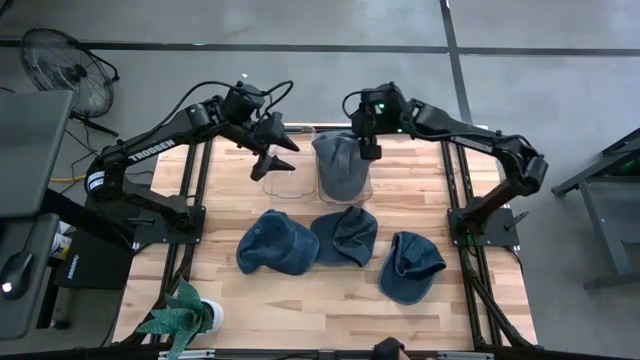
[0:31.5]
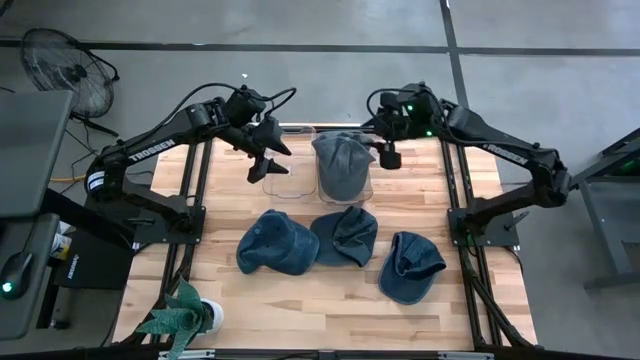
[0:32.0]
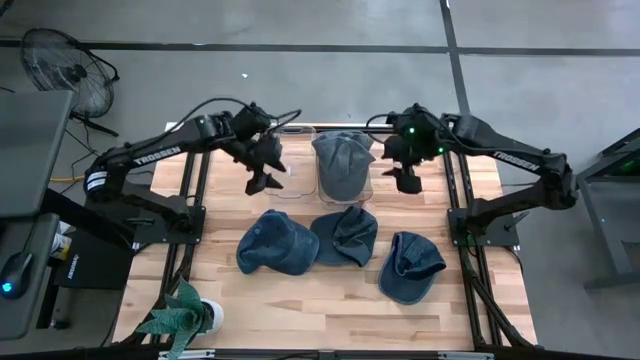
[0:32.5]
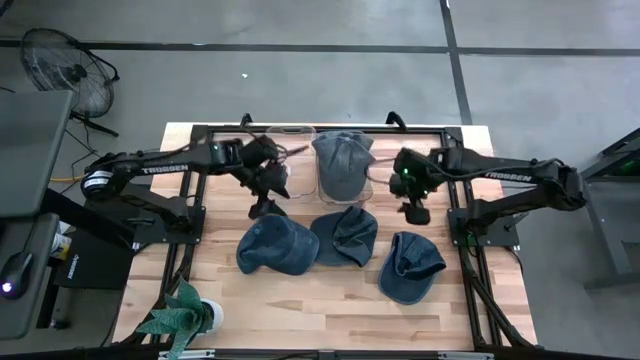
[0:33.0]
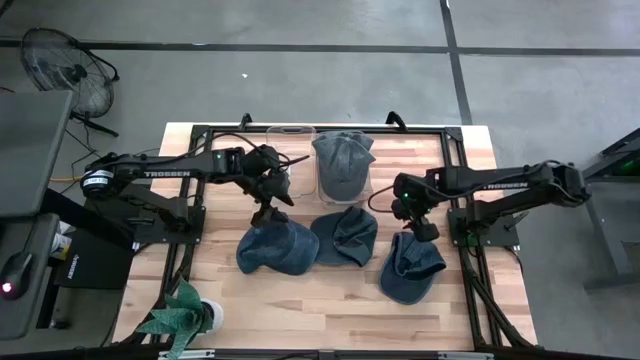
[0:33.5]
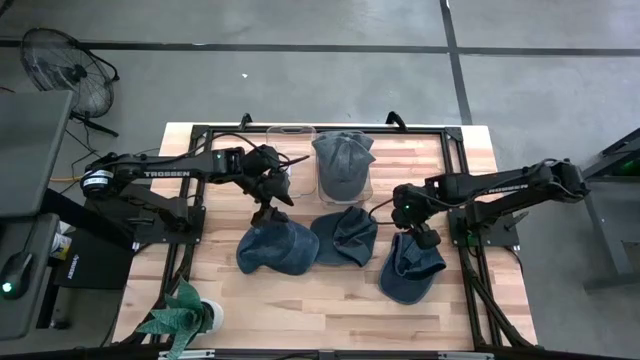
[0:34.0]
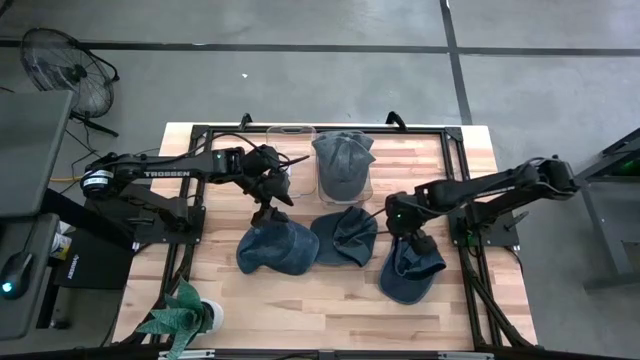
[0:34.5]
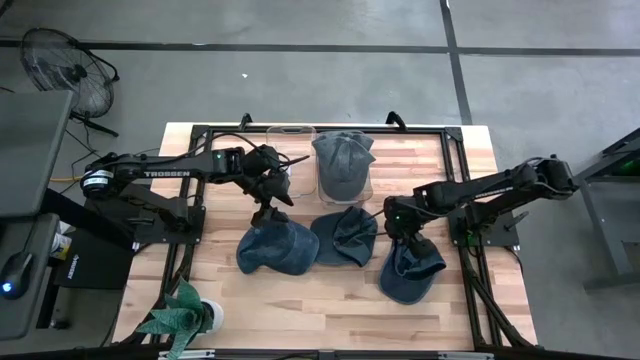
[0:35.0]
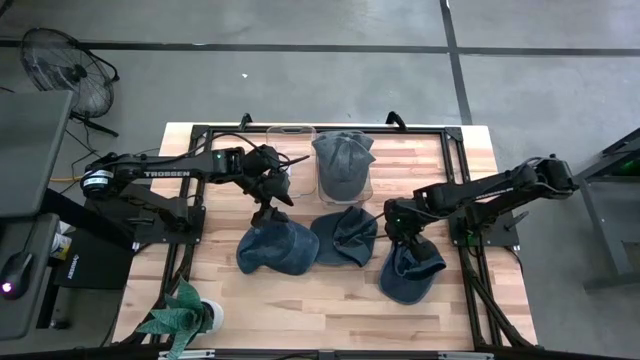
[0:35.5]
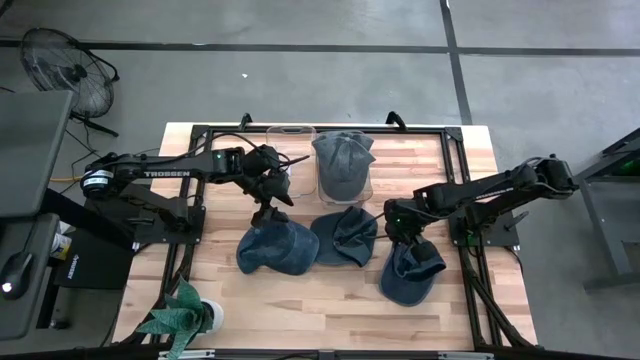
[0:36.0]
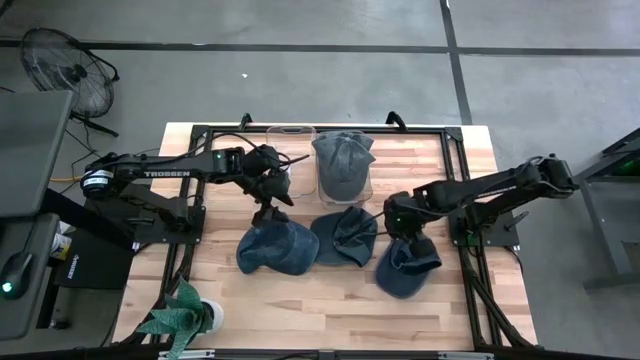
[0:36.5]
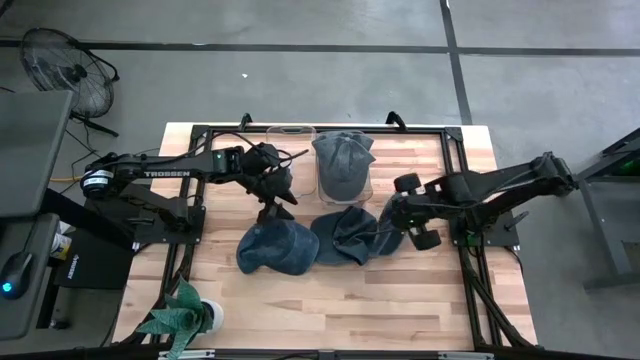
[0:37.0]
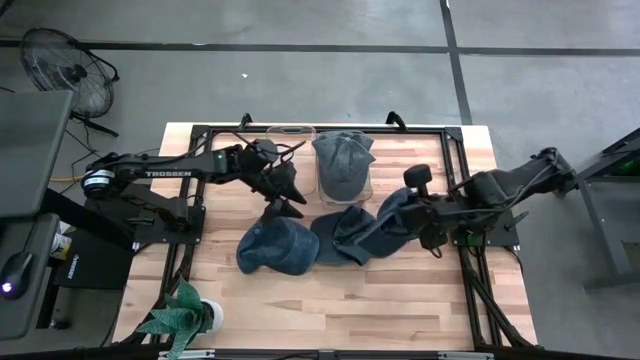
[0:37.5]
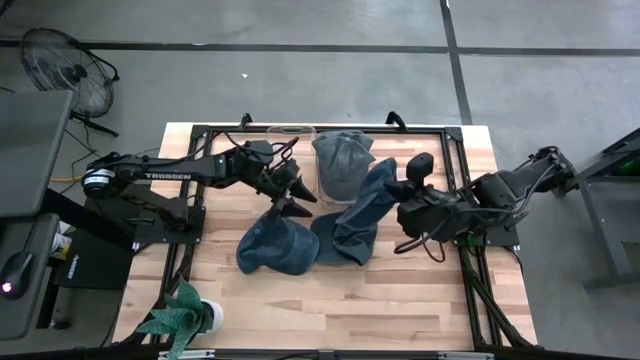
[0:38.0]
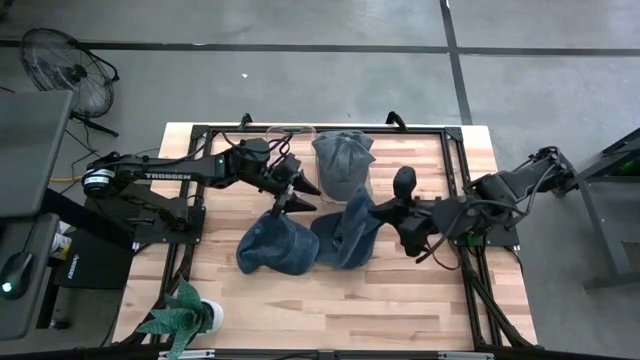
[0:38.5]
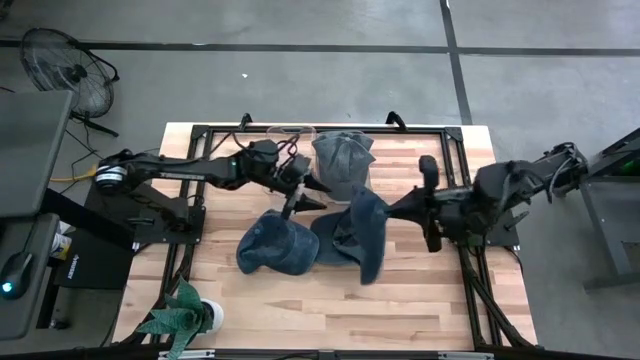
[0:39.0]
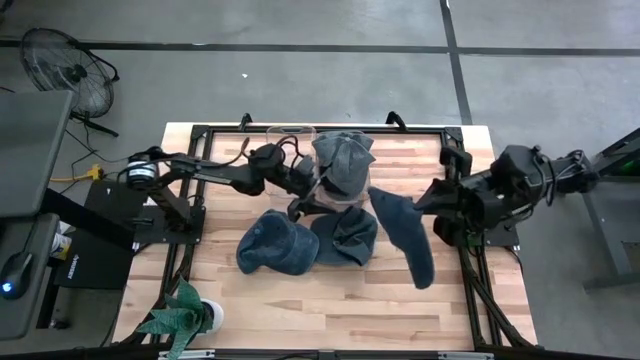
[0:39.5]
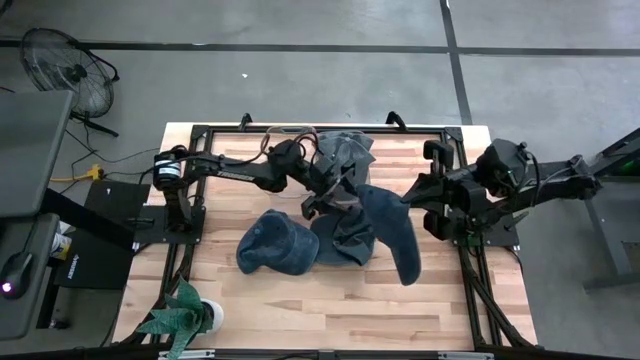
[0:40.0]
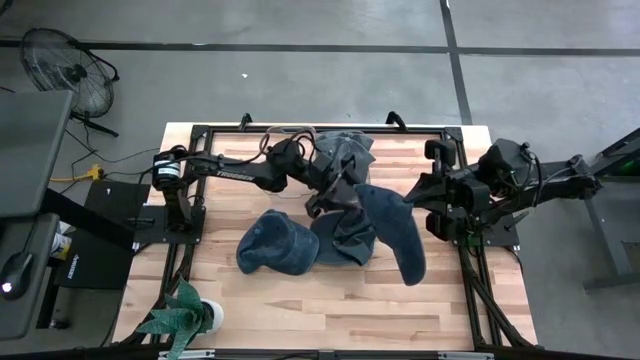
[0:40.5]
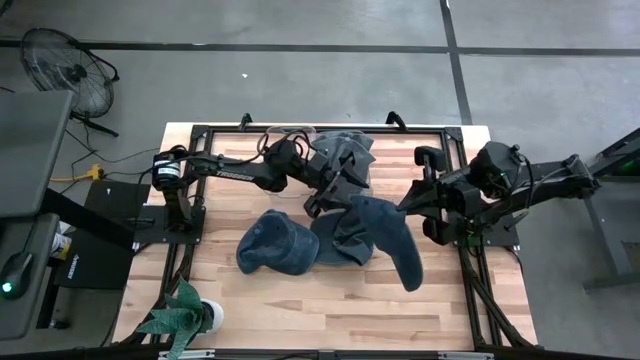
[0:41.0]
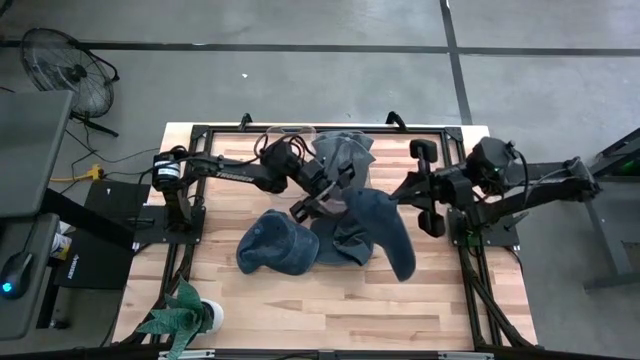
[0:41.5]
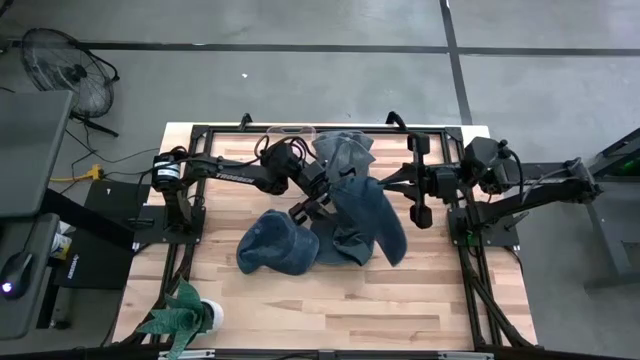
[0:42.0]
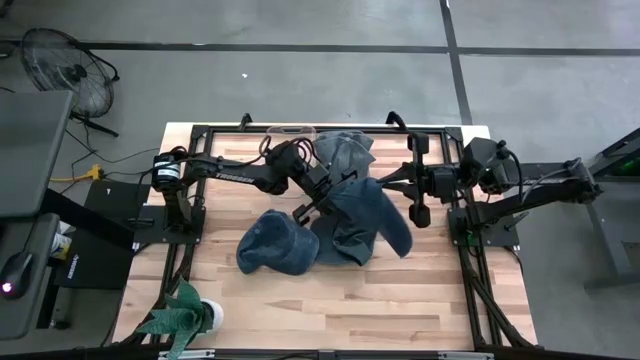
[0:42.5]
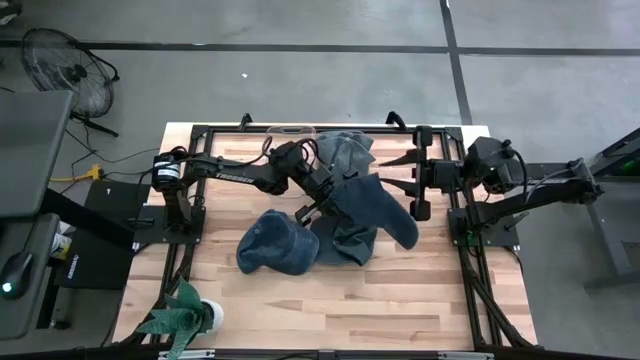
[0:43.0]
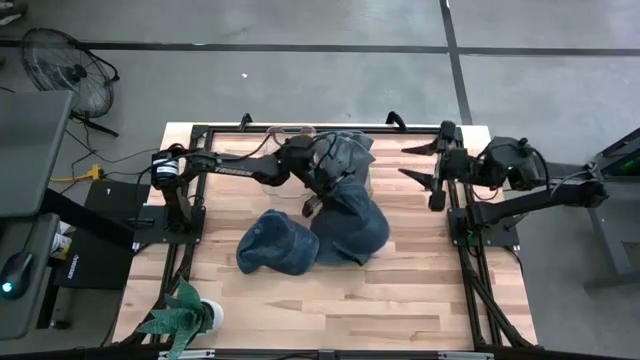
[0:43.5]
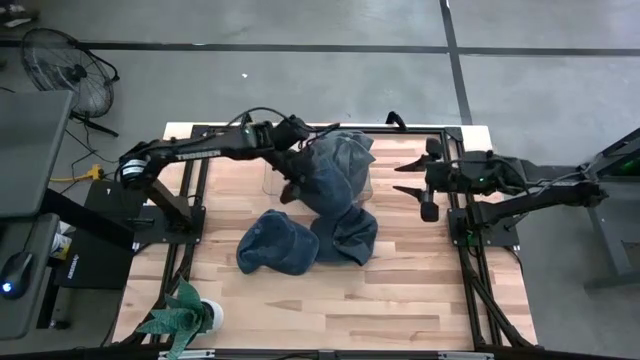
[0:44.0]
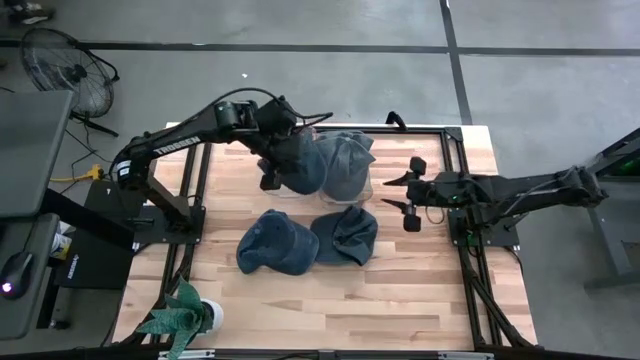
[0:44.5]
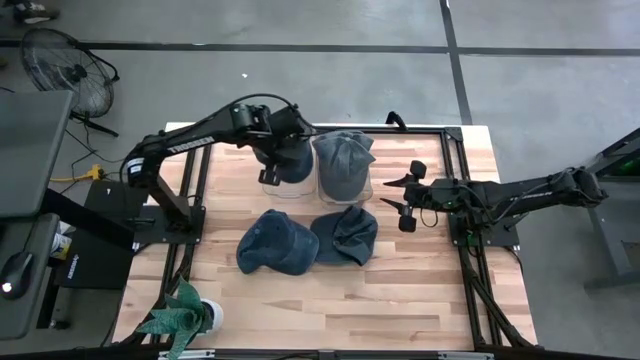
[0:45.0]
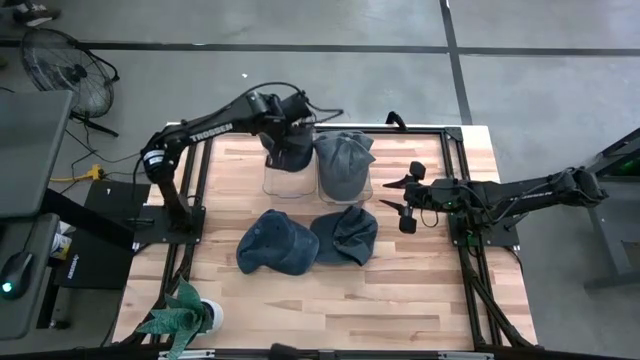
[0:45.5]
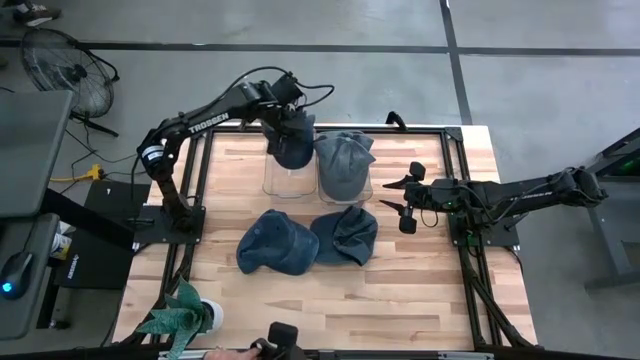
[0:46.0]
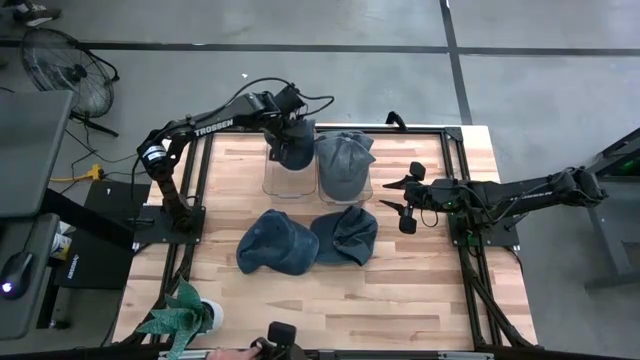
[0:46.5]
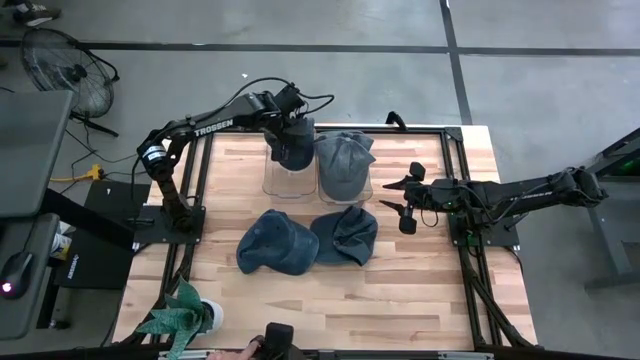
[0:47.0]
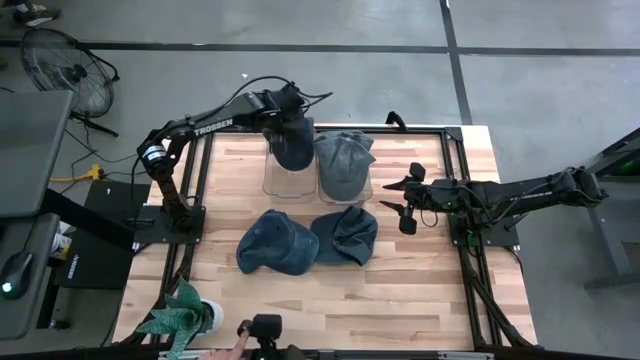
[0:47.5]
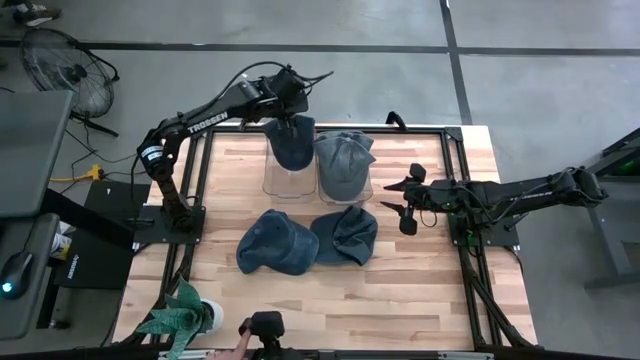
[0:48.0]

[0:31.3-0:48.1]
Task: Pick & Place hat
Put the right blue cap into the left transparent bin

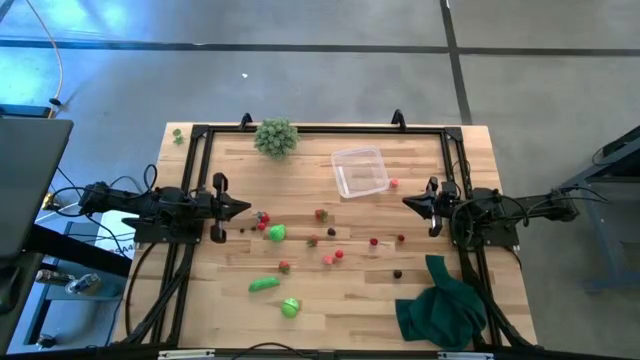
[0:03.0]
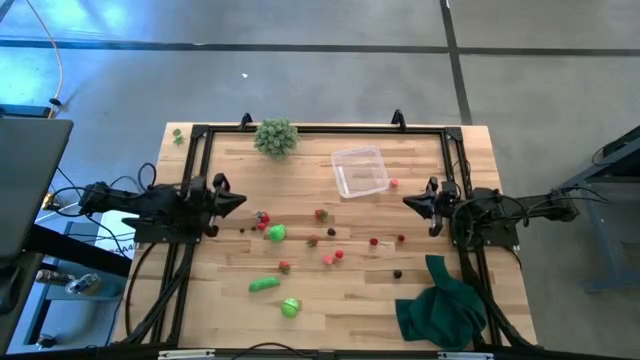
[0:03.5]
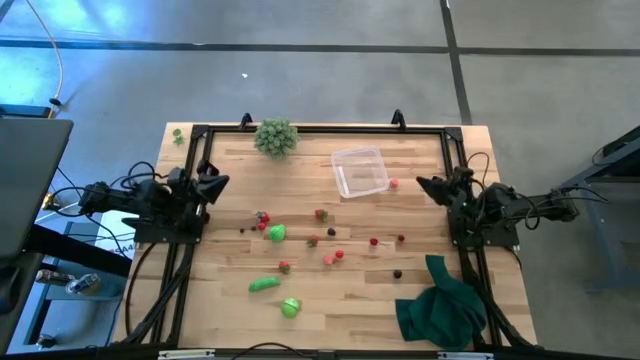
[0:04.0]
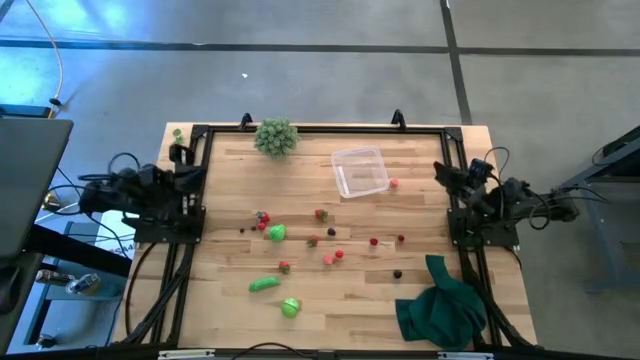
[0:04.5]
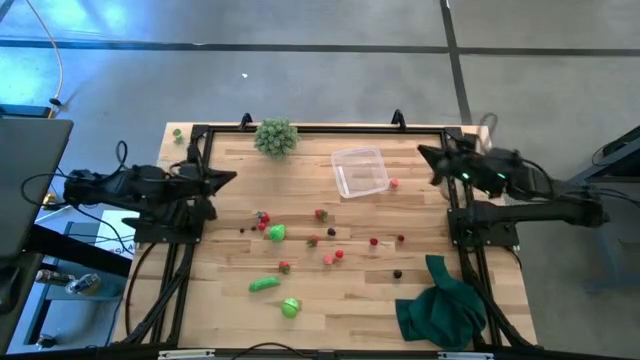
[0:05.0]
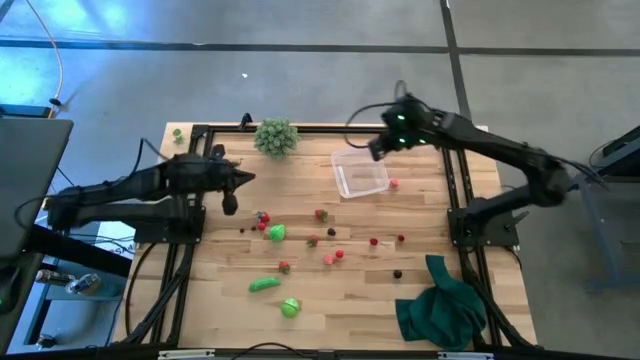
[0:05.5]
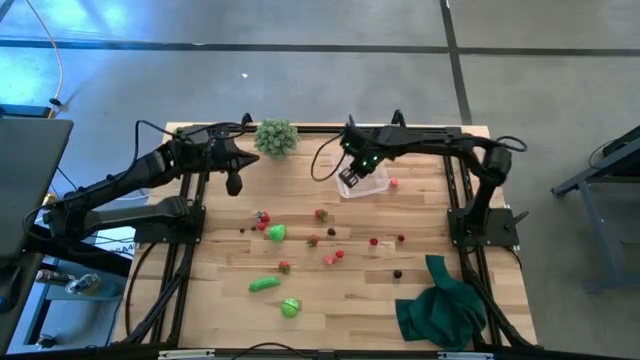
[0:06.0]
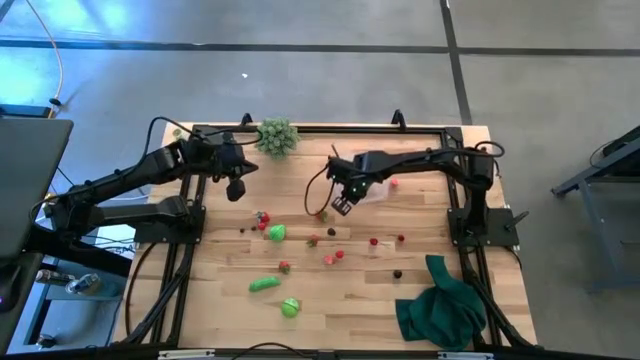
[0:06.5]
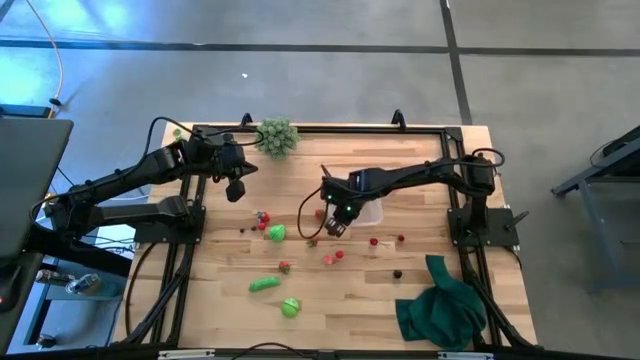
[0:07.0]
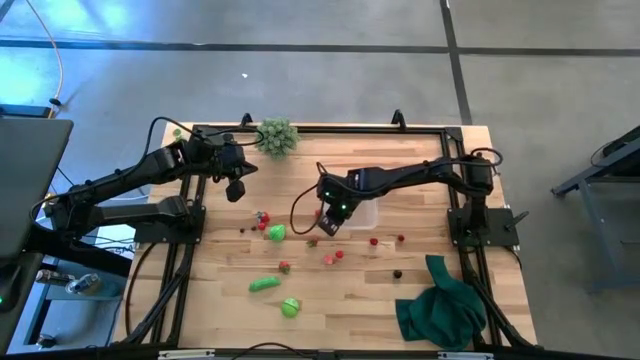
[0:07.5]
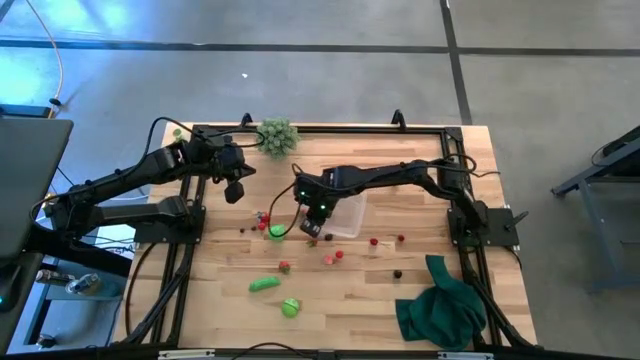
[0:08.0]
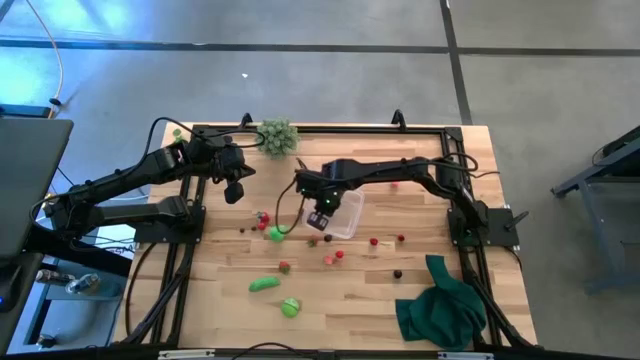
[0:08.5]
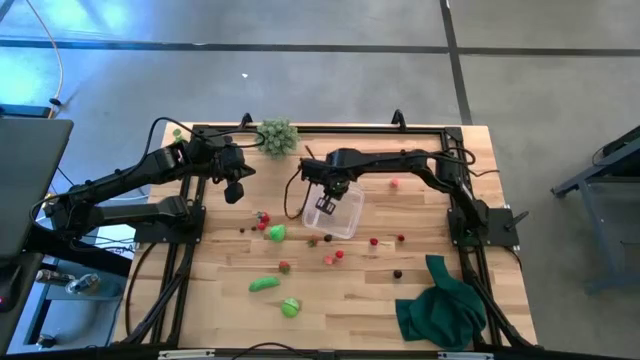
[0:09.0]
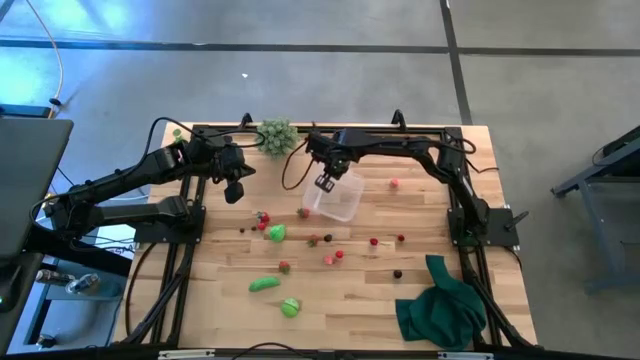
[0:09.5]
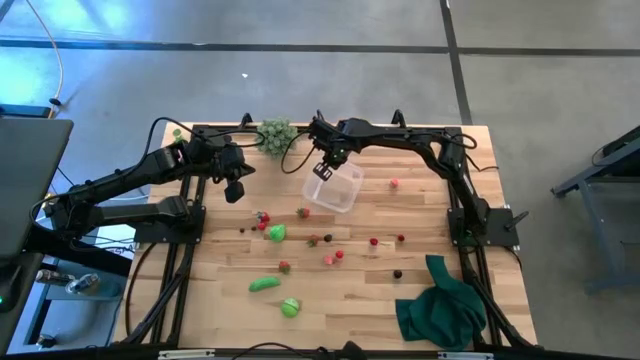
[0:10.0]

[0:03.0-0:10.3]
Task: Pick and placing Produce into tupperware
Prepare the transparent container to put fruits and vegetables into it
